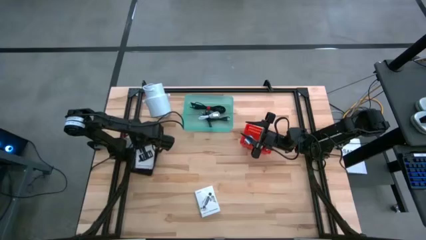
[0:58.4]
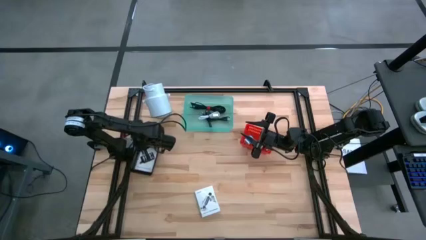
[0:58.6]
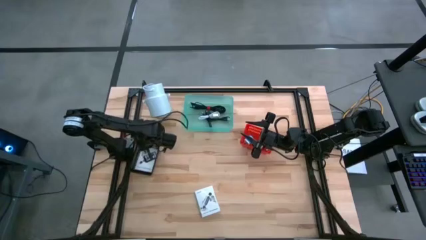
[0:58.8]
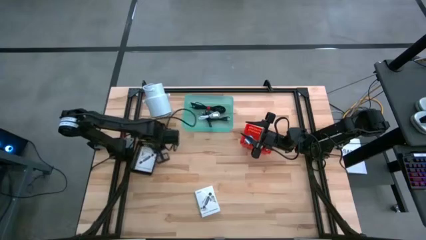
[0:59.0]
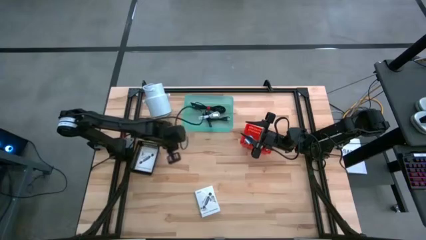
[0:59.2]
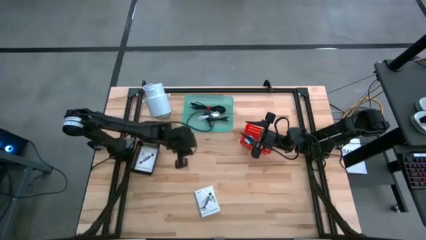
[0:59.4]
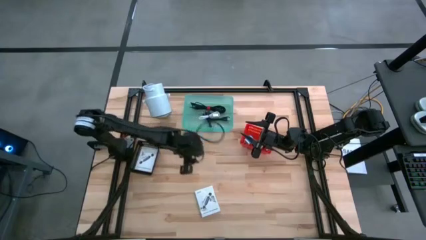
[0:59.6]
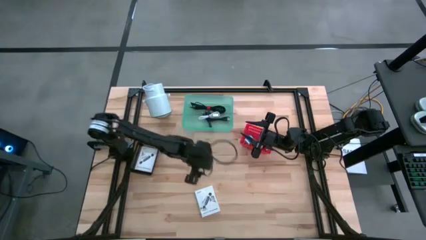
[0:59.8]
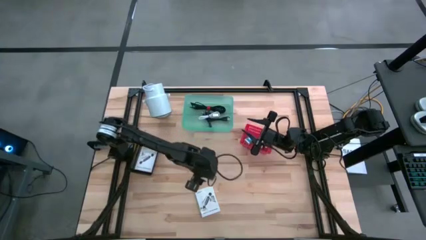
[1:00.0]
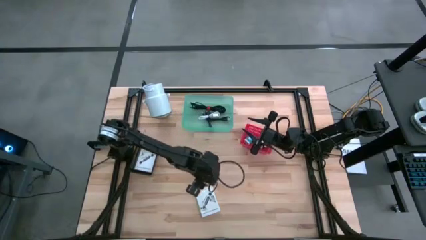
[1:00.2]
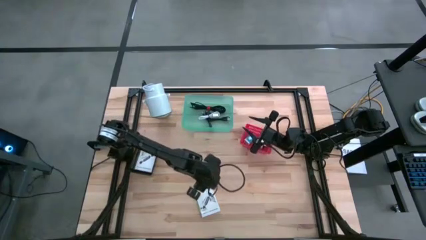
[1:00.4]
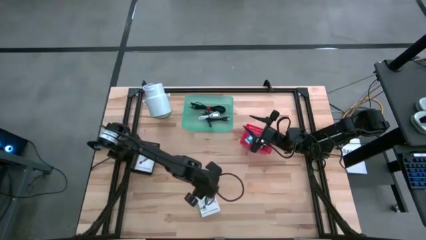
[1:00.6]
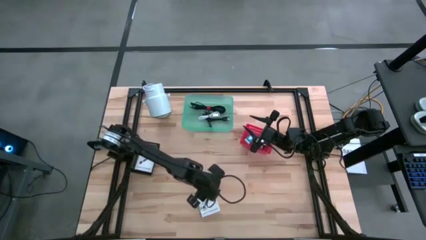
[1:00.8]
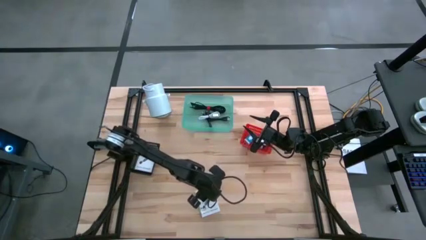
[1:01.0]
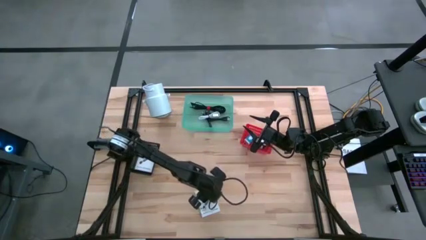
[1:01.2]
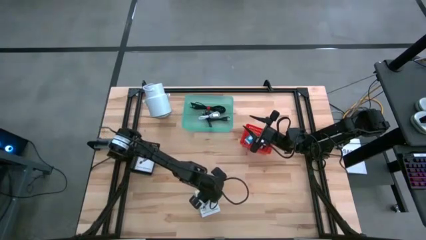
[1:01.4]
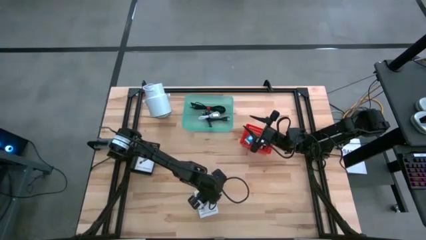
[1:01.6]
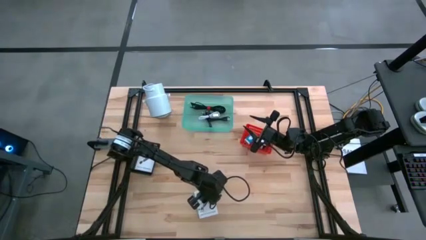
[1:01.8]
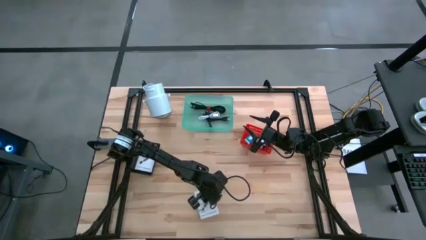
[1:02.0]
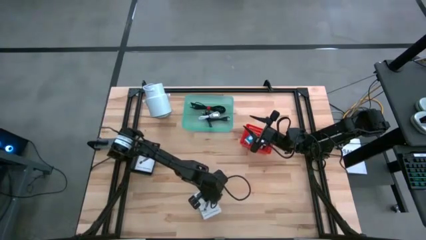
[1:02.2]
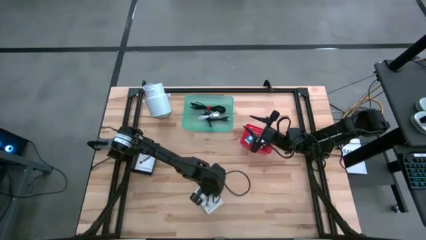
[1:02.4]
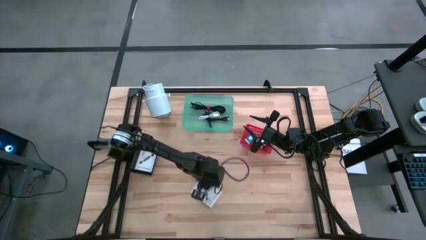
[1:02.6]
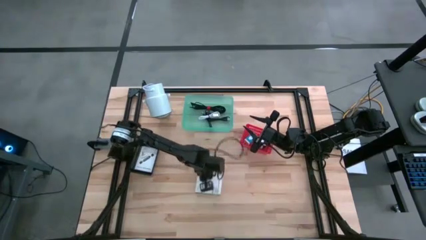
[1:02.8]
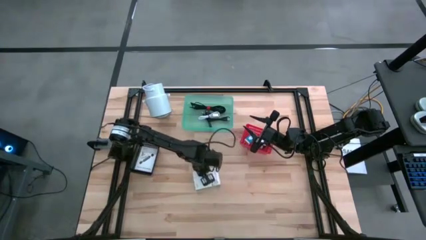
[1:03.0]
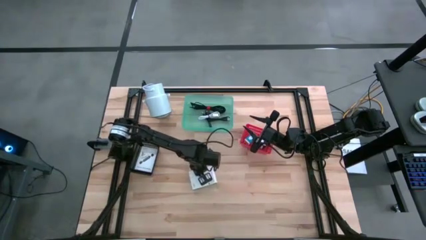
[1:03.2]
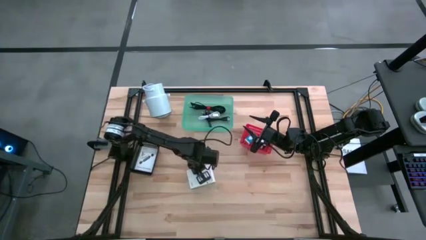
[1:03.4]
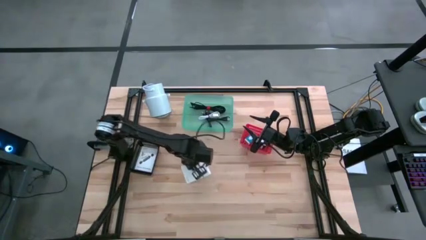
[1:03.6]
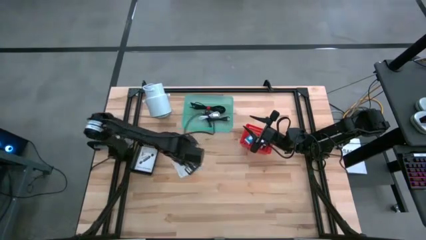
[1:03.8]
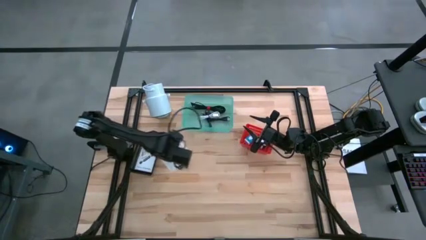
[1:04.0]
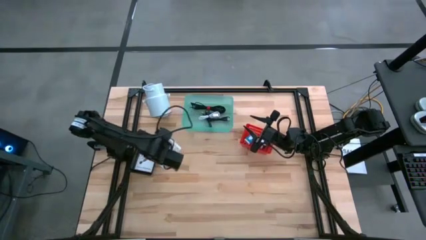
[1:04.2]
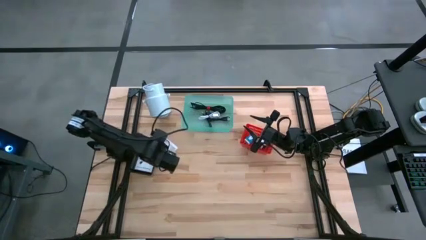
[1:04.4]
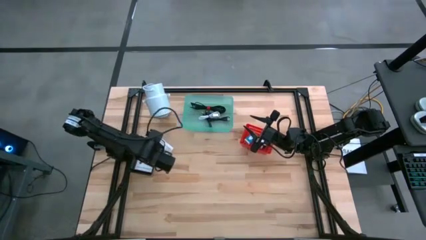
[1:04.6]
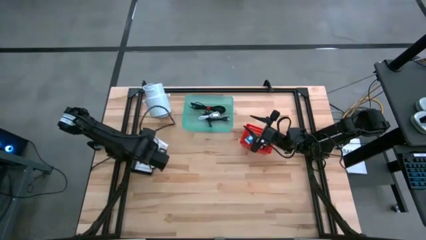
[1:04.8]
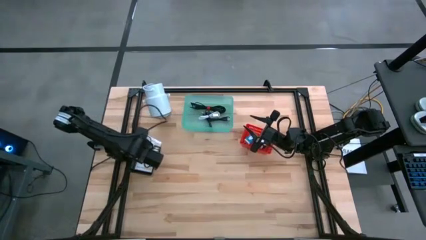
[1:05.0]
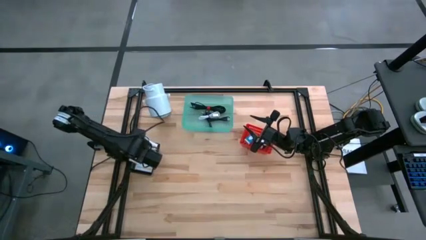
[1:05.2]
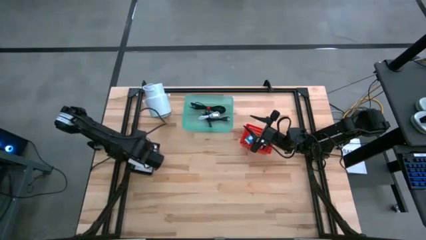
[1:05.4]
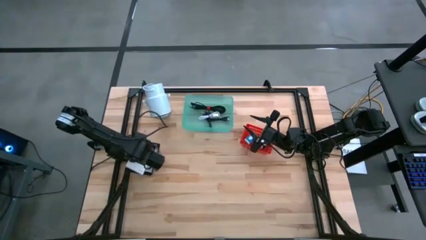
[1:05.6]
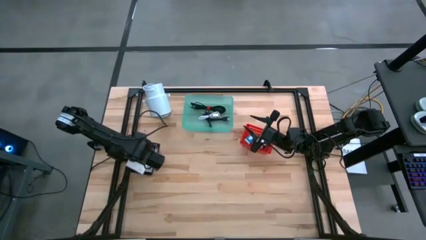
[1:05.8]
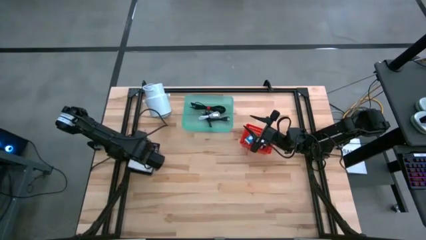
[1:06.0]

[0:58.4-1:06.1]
Task: Pick and place items into bin
Put the card reader box into the black basket

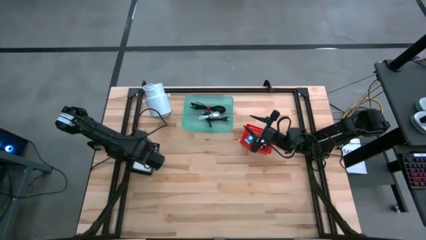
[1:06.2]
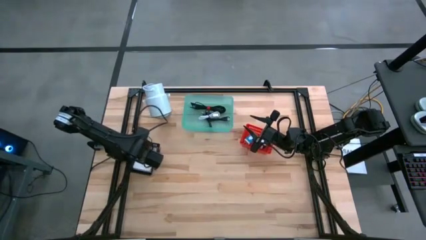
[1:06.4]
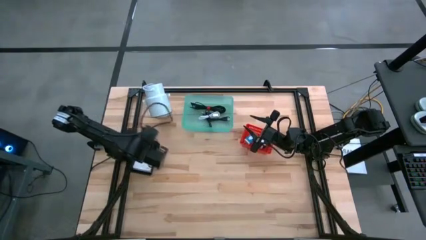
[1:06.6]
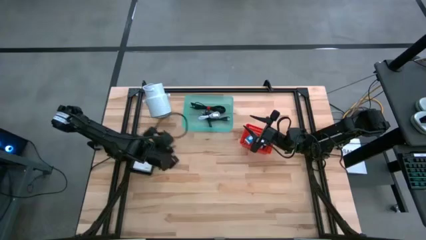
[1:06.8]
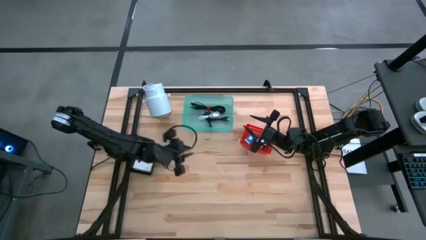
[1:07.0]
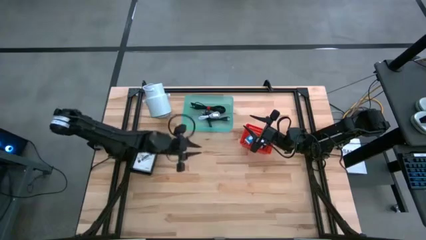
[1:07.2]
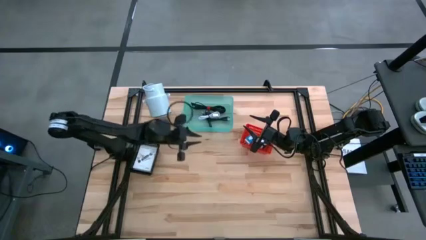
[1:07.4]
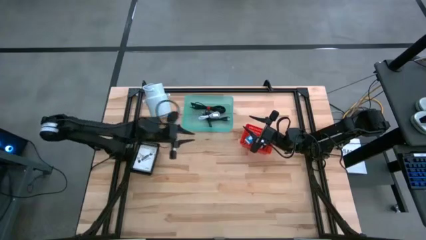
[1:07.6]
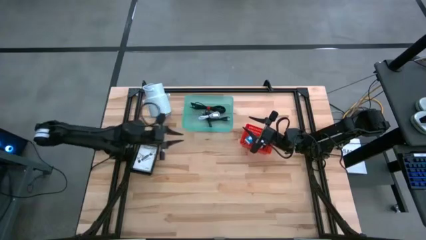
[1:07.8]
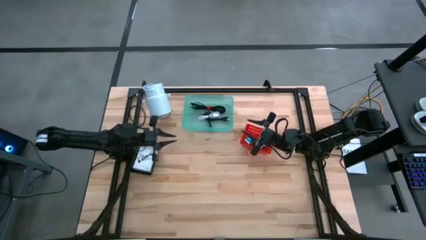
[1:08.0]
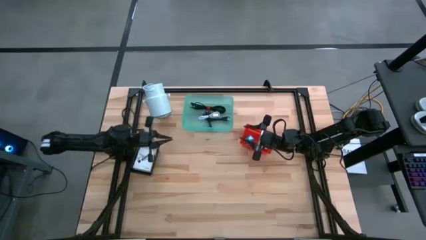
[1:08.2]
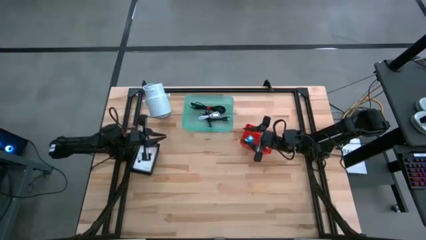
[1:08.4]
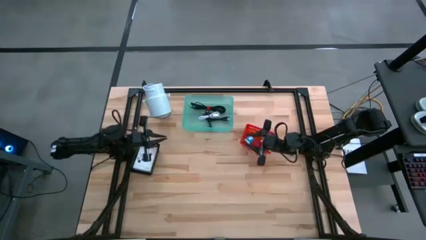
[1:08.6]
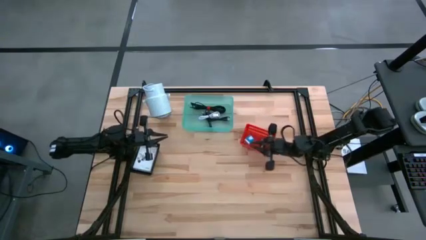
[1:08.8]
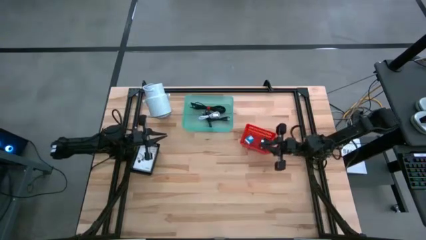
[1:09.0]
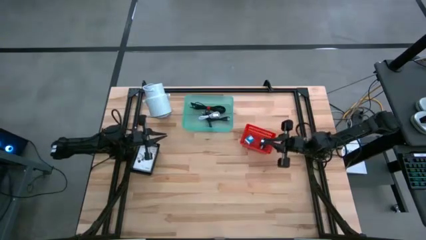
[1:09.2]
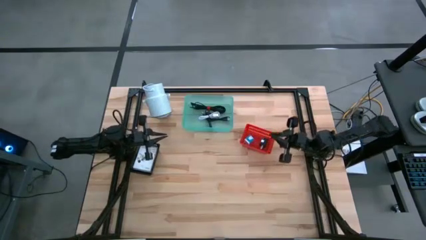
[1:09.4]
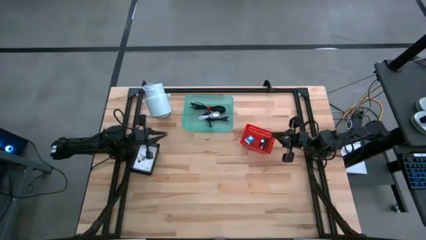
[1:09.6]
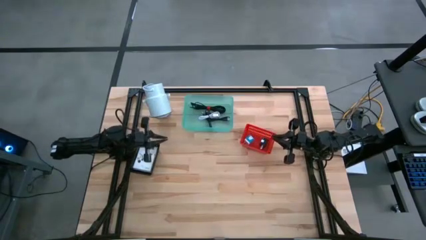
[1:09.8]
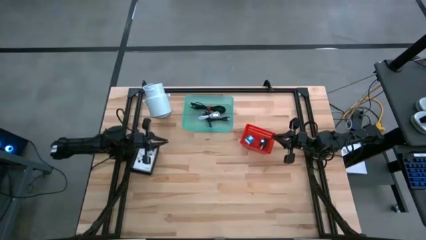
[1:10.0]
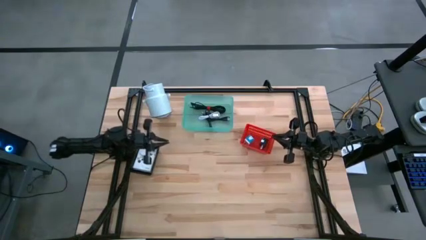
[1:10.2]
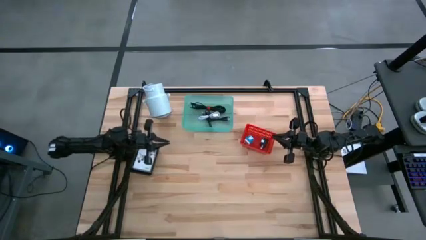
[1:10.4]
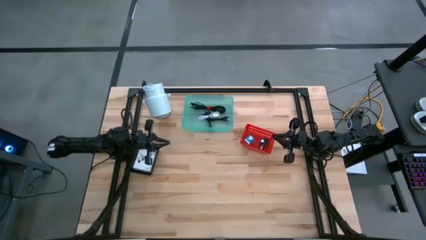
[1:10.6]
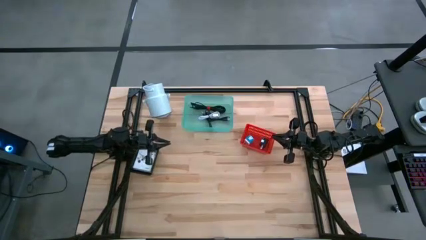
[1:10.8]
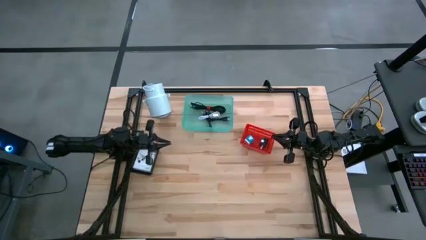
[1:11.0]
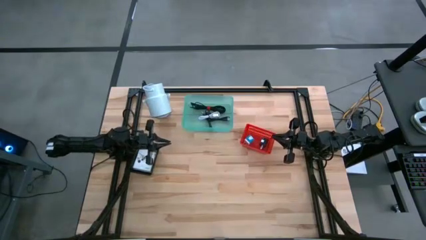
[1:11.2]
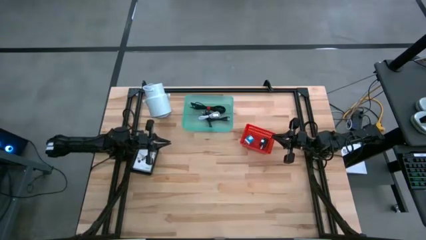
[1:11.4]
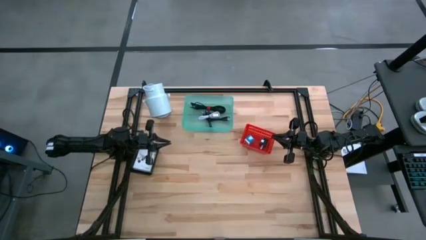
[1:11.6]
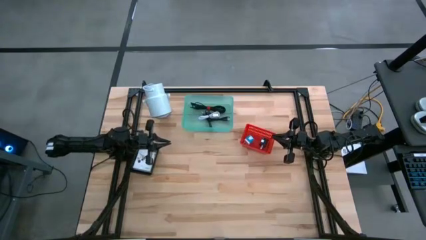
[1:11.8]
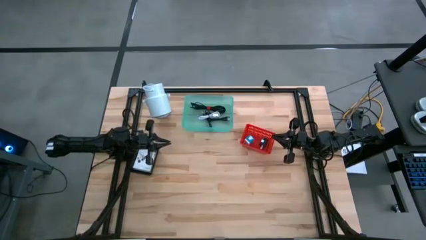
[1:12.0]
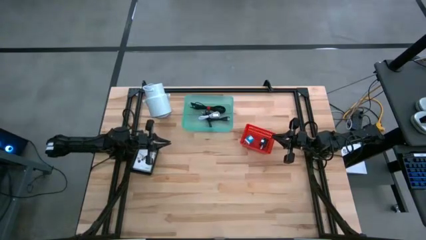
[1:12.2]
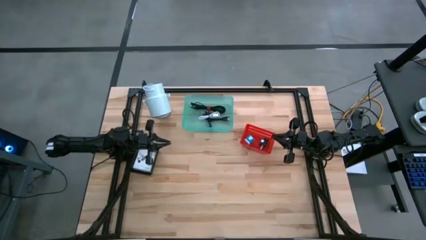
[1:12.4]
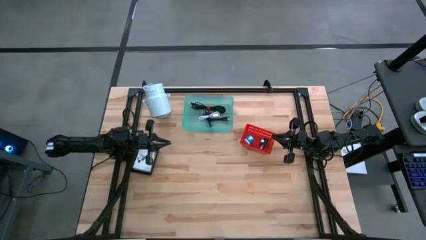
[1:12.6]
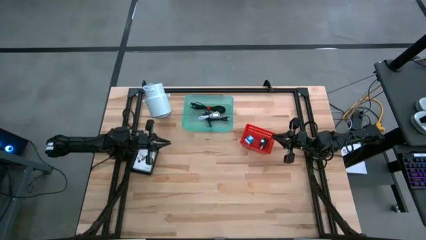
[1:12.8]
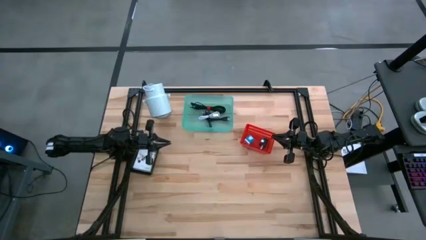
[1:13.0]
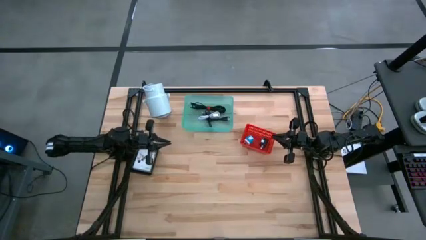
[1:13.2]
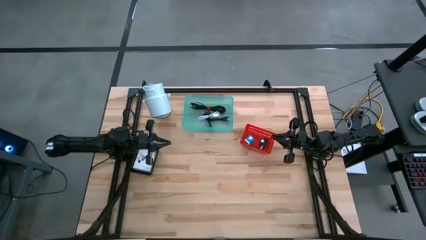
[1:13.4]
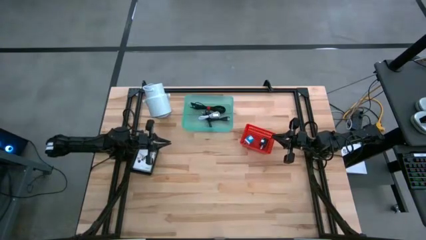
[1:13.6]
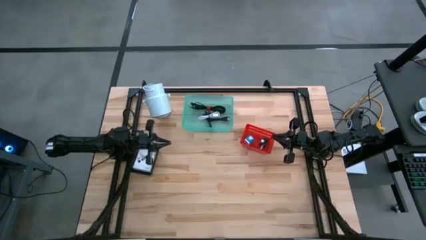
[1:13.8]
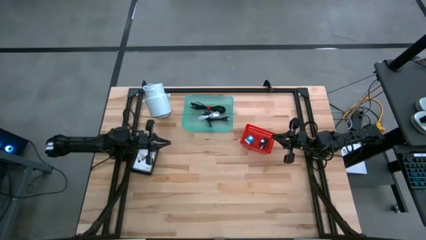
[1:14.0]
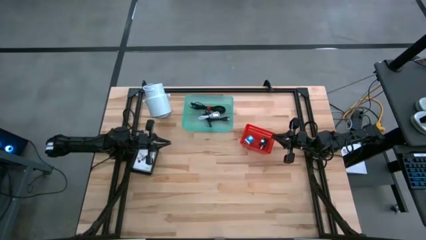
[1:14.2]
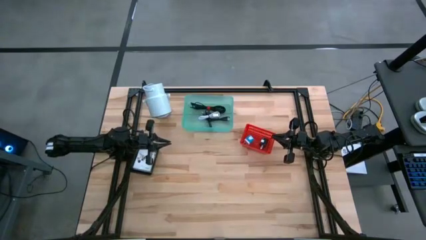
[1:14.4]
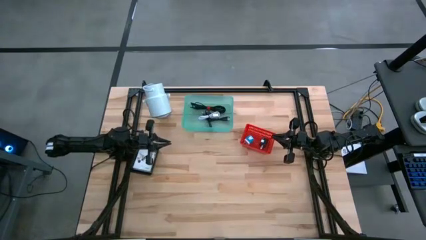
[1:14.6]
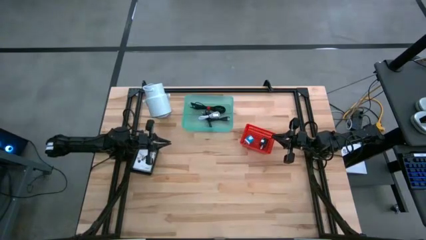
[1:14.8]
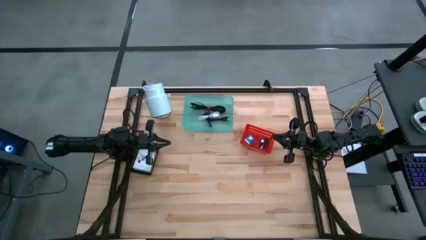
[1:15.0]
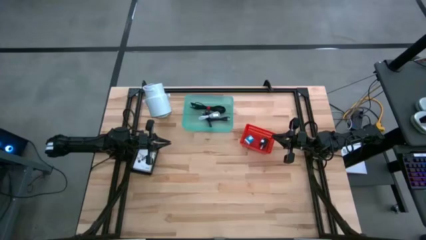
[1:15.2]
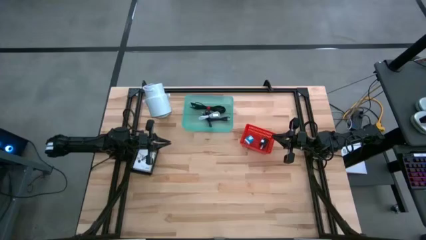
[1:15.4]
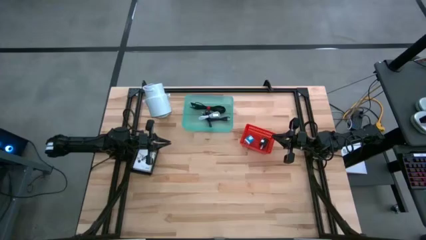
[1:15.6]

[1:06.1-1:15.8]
Return to Home Position
